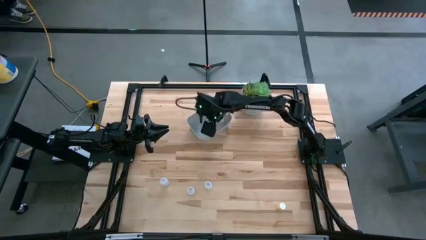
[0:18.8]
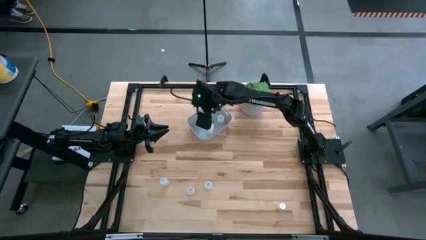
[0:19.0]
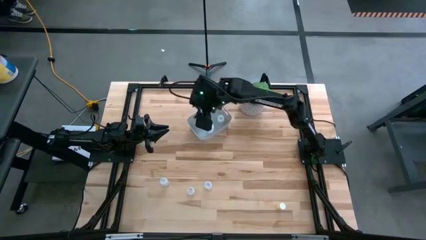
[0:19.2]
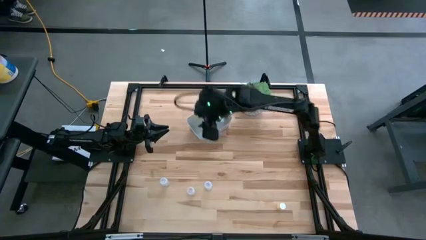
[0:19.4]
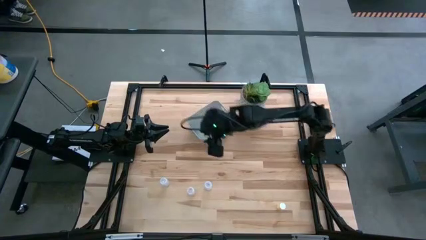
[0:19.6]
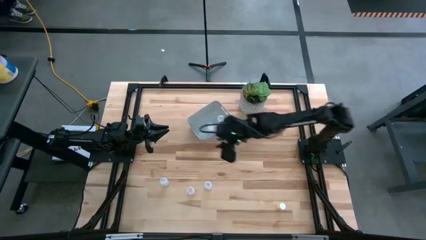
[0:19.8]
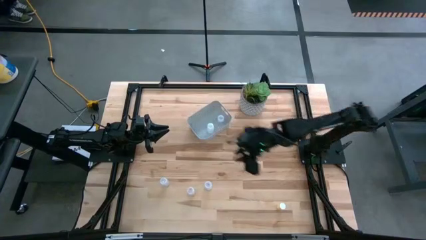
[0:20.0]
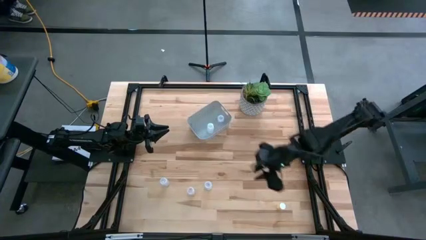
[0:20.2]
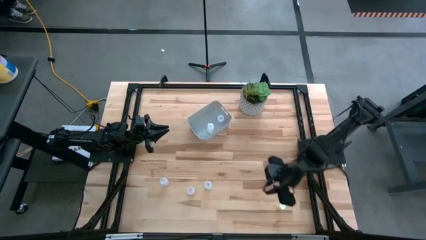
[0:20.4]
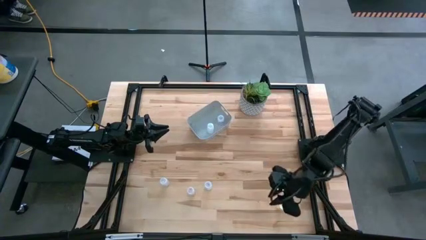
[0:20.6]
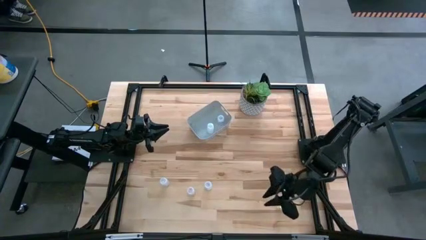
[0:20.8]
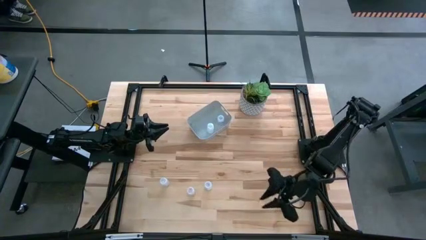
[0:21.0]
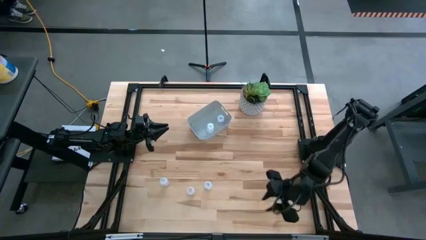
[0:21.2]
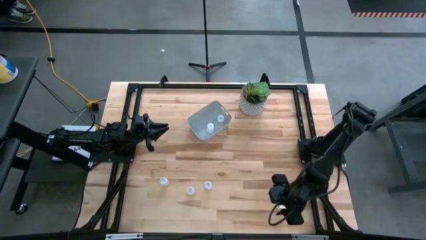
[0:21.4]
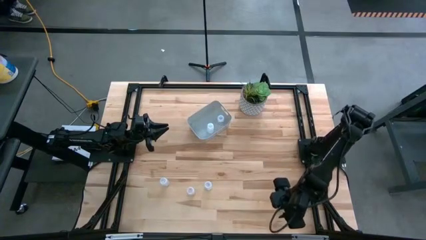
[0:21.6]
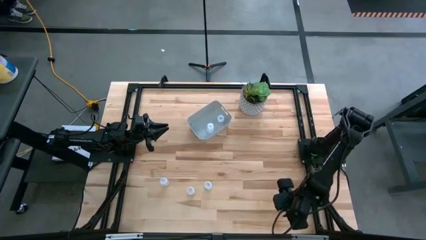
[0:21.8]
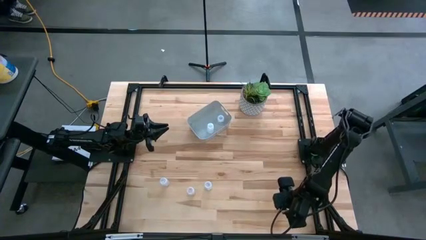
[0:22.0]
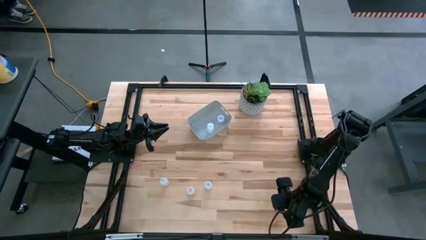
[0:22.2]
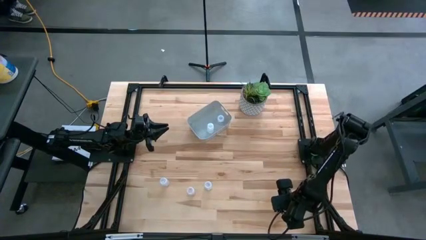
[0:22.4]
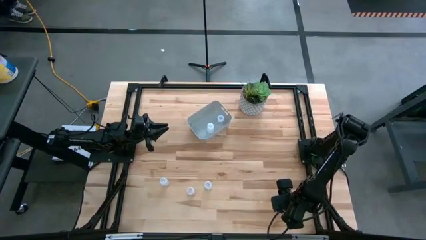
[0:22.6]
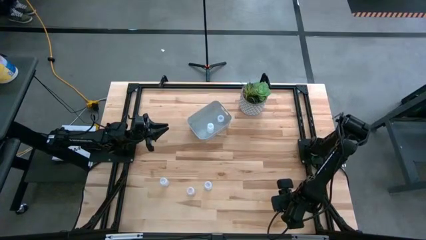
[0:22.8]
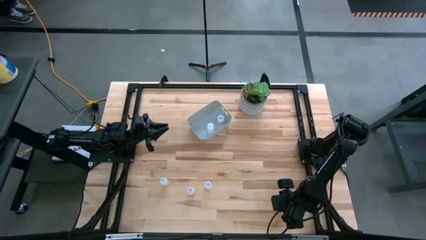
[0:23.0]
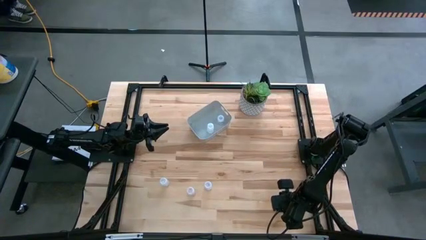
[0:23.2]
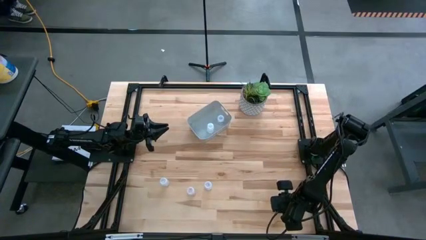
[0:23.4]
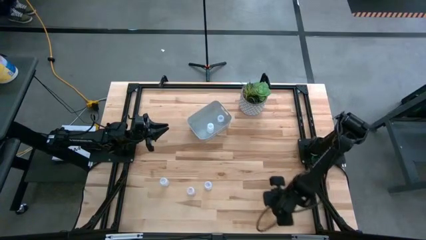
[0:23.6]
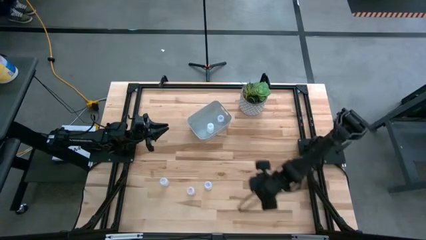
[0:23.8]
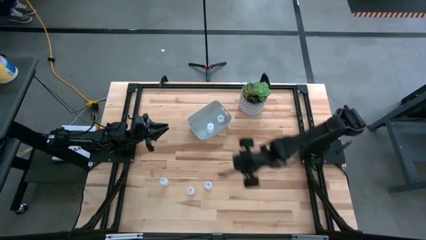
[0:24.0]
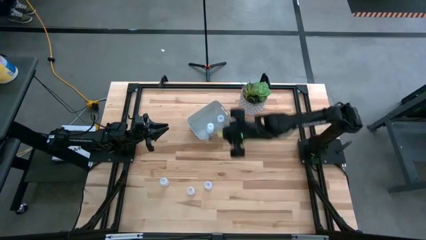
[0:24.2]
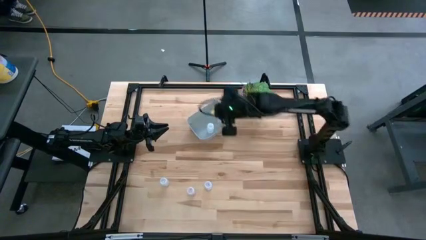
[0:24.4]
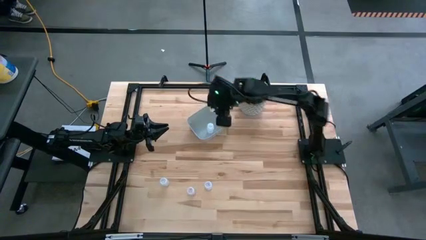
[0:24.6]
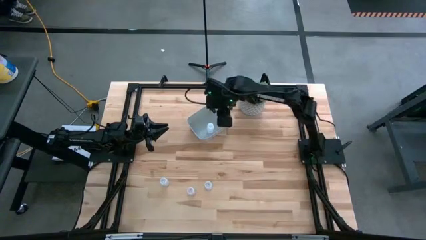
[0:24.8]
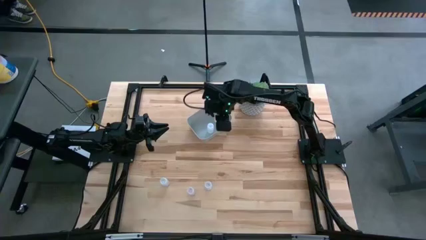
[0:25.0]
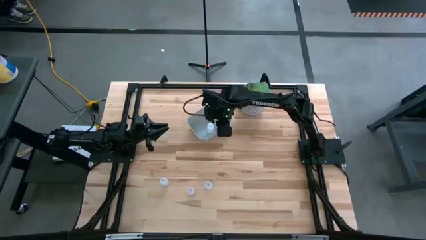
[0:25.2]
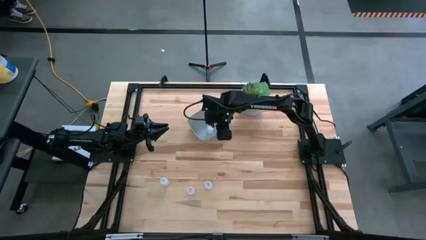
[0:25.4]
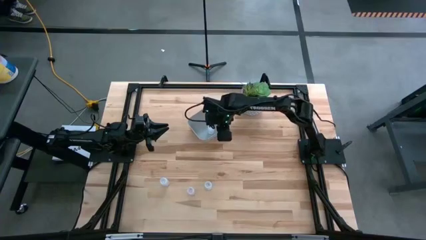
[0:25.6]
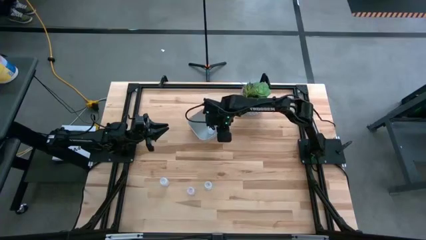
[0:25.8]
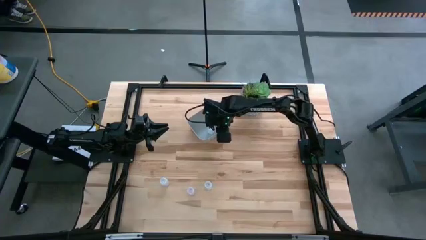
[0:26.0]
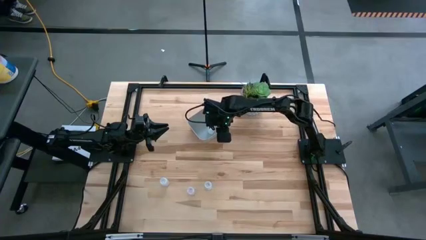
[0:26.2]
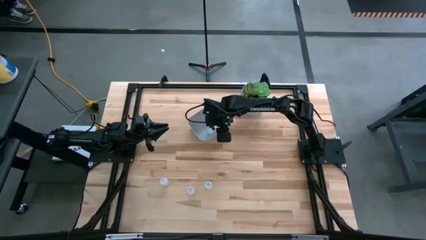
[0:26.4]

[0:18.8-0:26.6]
Task: Pick and place pill bottles into a basket
Put the yellow medicine bottle into the white bin

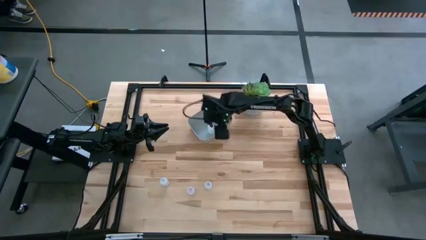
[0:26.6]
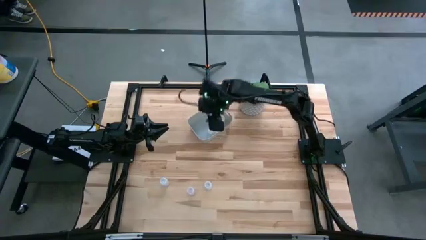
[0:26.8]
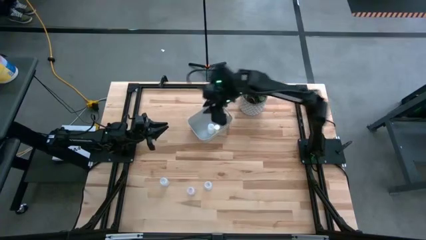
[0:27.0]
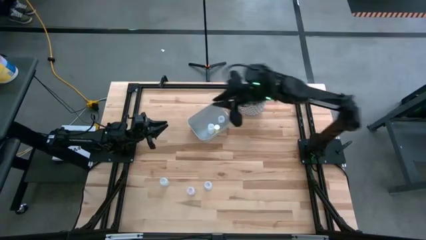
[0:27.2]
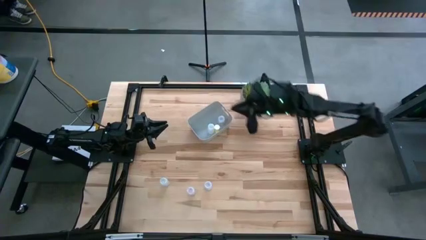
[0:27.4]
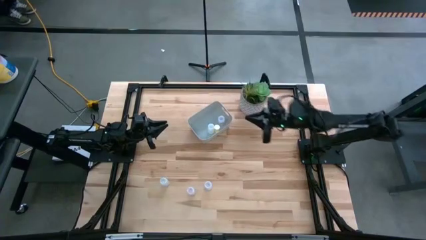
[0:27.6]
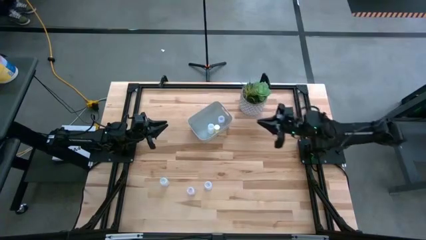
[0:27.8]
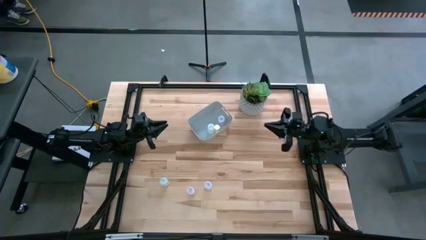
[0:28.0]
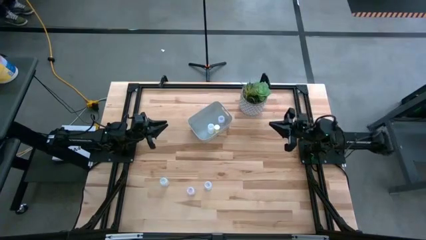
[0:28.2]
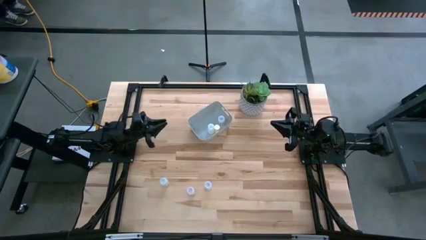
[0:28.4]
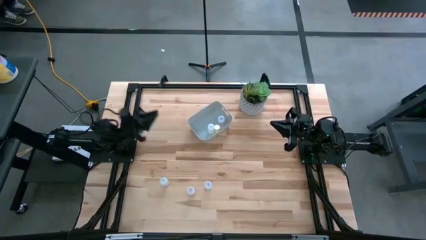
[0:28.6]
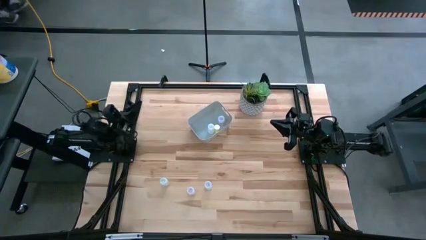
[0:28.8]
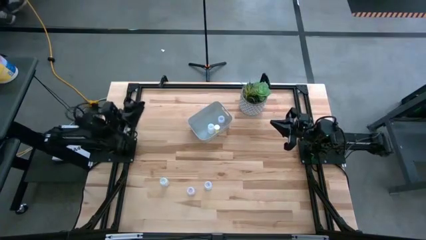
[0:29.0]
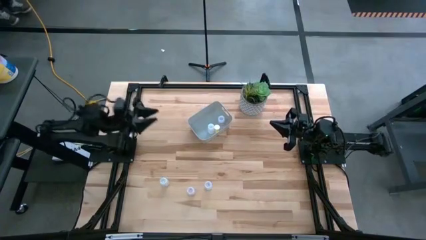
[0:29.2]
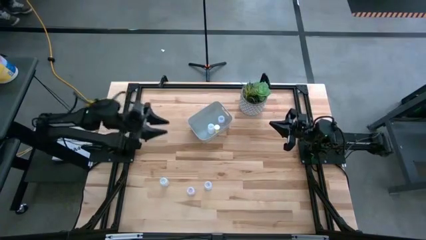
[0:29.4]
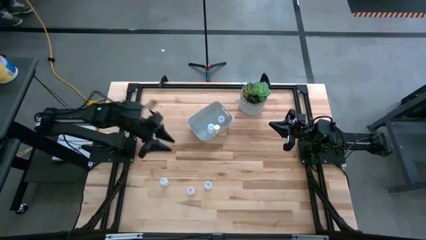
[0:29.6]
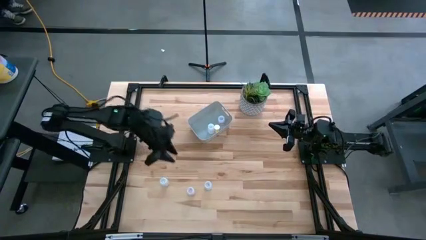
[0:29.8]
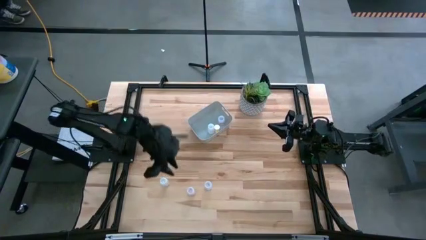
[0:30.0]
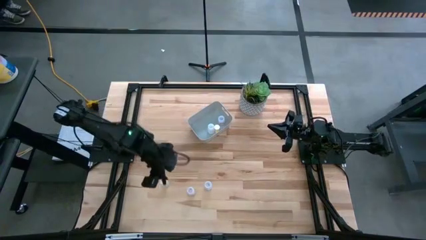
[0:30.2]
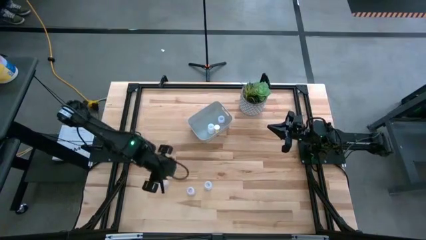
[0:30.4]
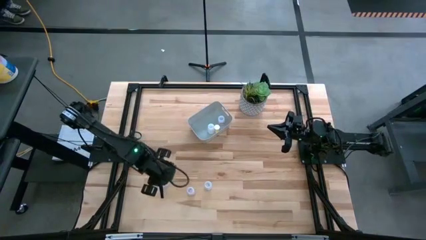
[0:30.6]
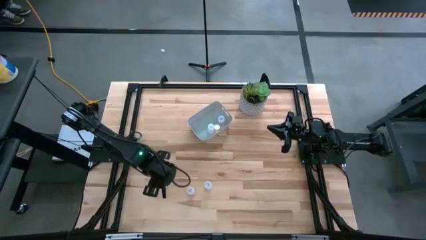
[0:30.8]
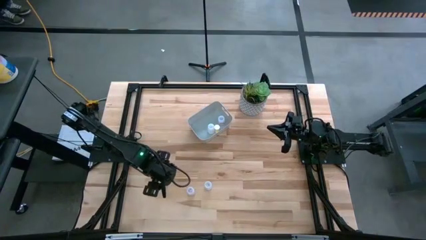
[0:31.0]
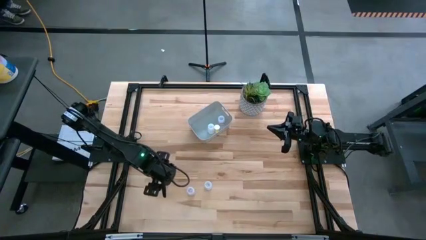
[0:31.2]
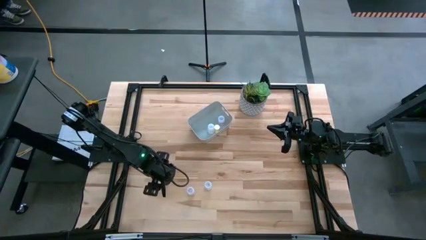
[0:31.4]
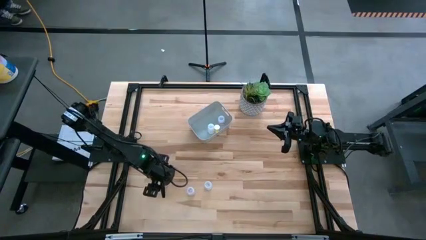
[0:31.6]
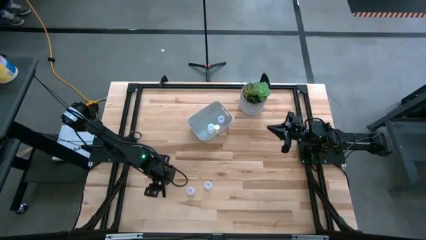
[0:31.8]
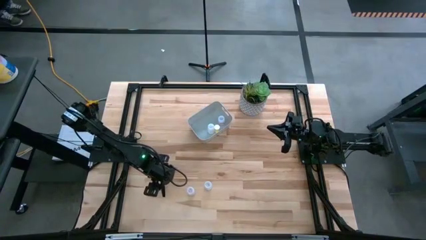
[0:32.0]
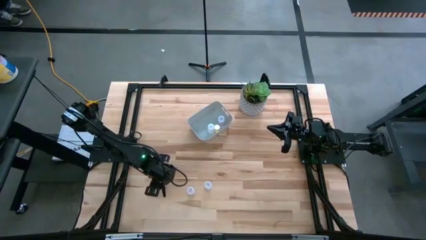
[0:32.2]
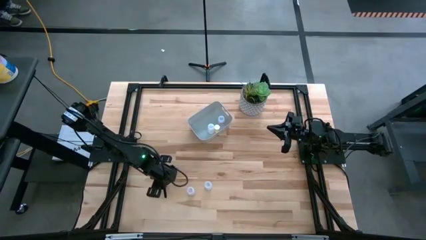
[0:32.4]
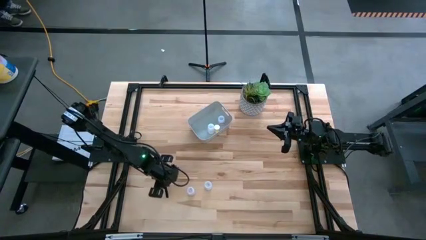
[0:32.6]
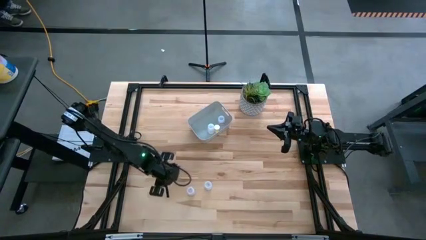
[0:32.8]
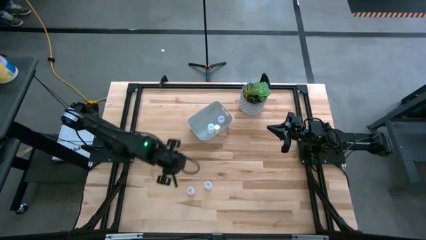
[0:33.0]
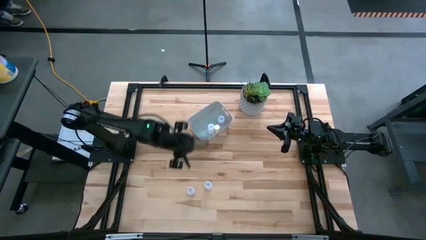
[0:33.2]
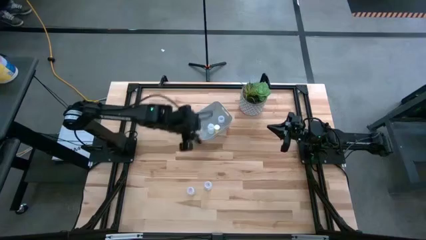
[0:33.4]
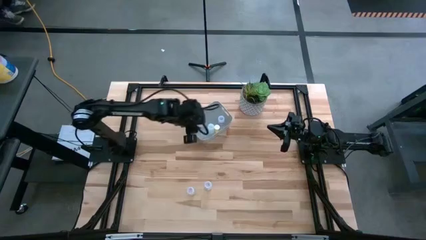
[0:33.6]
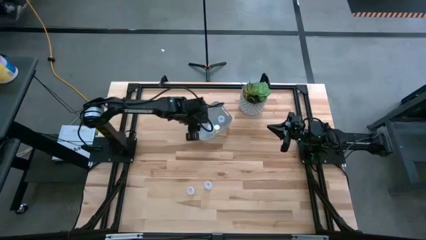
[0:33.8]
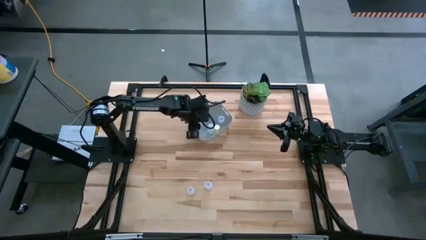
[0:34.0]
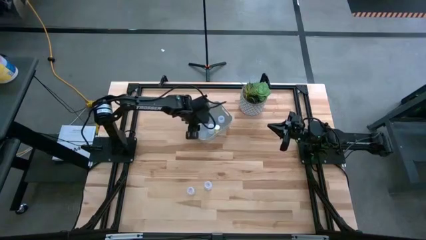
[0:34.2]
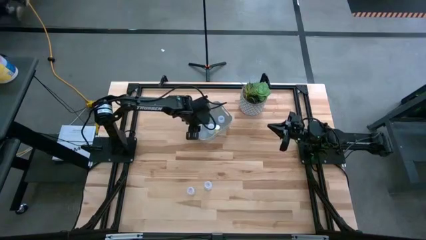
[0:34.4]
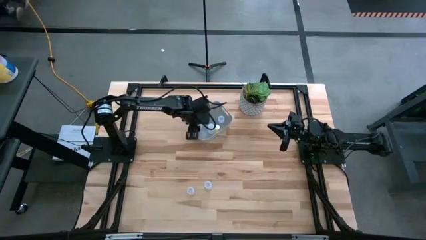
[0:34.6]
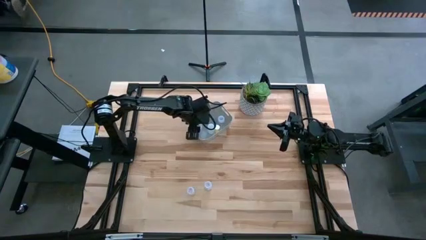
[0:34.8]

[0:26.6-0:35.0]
Put the transparent medicine bottle into the white bin

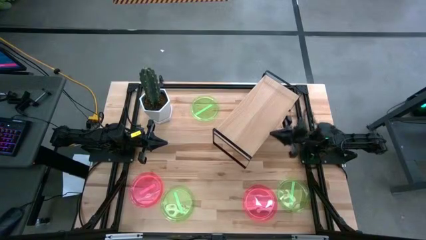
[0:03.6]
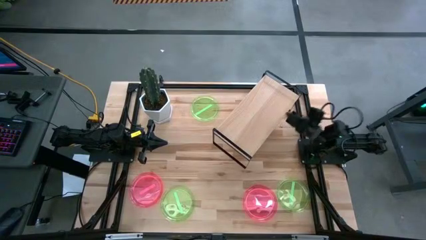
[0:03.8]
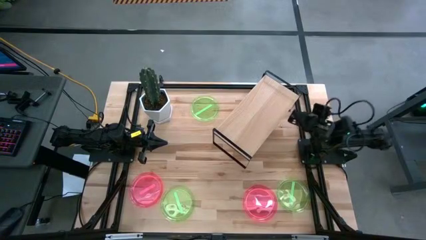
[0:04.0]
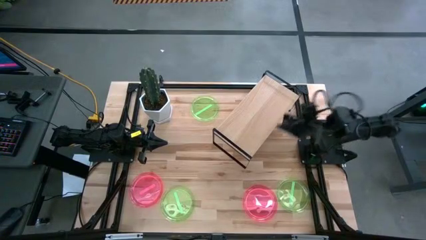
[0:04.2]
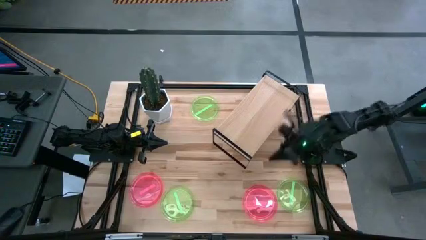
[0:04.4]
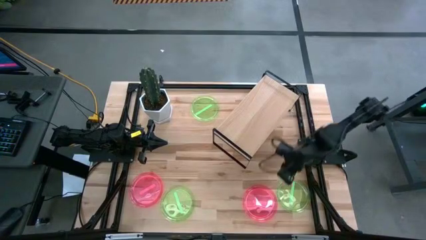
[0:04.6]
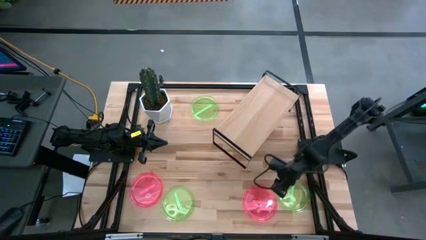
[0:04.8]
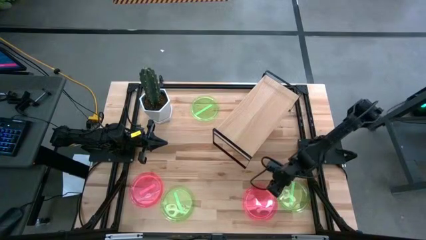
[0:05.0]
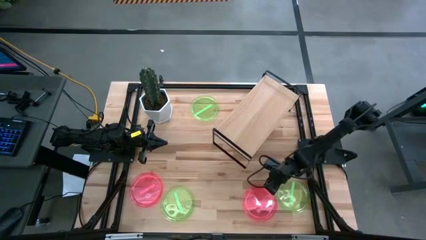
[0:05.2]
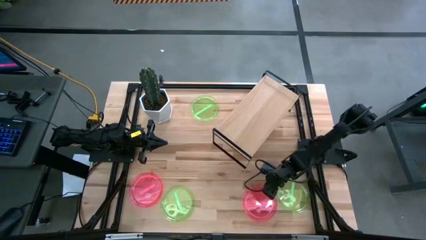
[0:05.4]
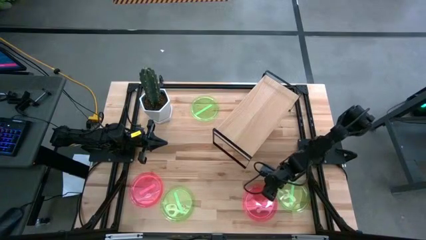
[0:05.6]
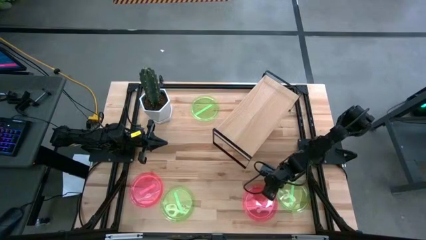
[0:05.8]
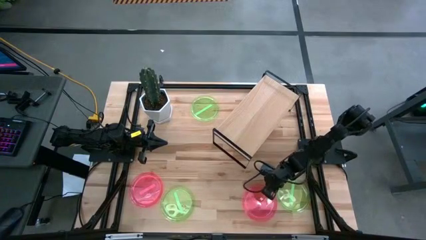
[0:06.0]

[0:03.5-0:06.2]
Task: Place and stack plates onto a shelf
Put the bottom right pink plate on the shelf
